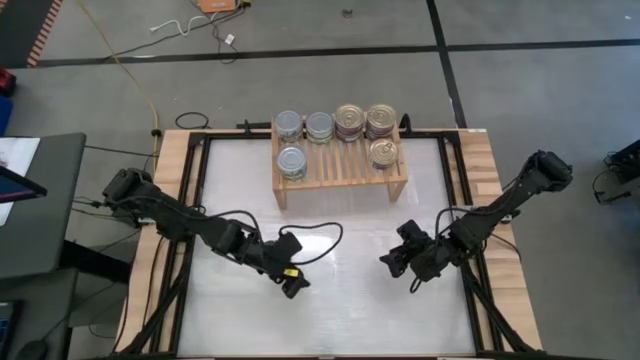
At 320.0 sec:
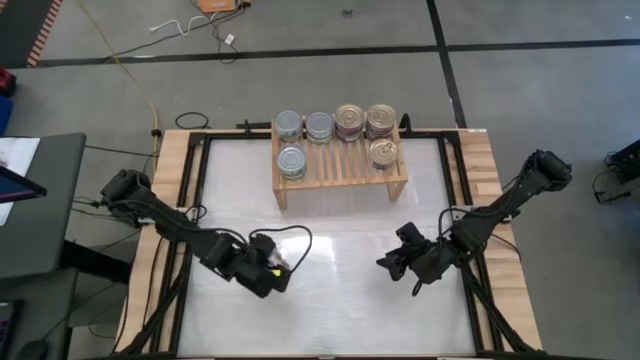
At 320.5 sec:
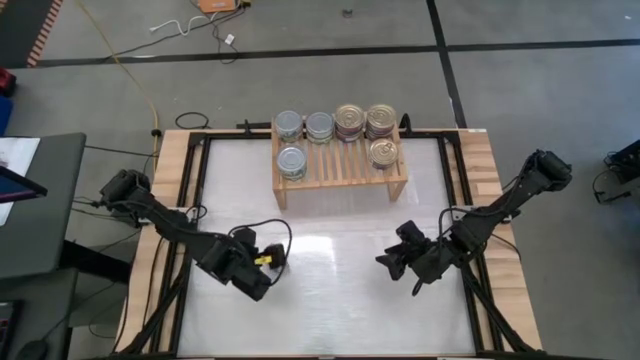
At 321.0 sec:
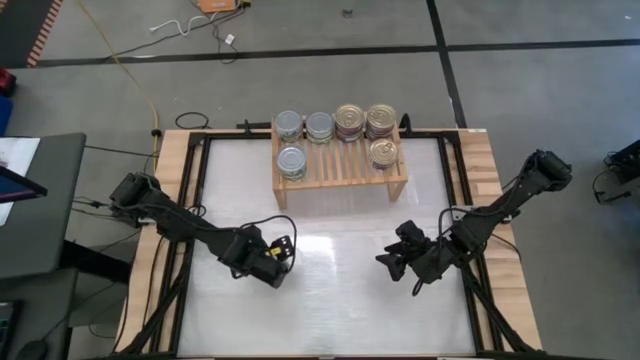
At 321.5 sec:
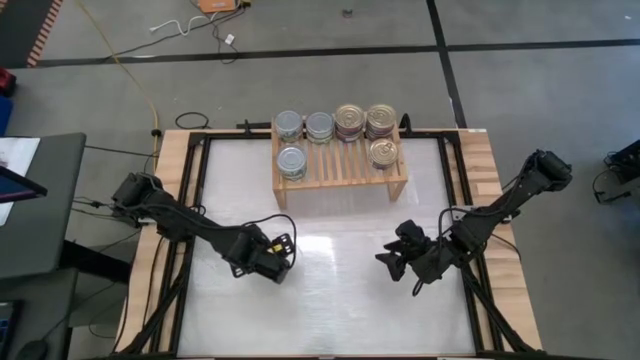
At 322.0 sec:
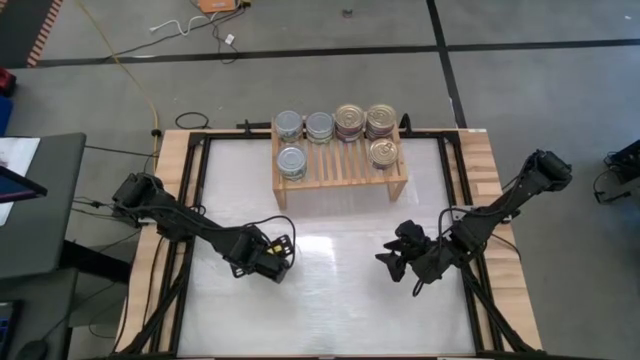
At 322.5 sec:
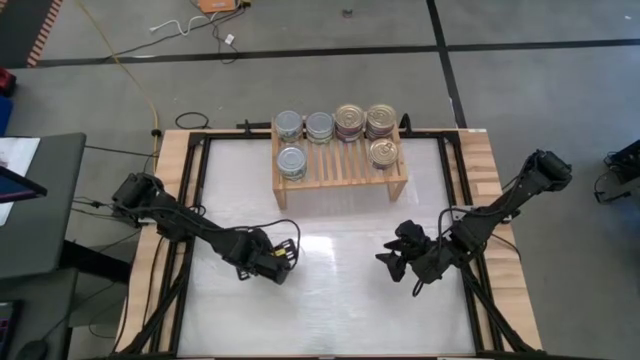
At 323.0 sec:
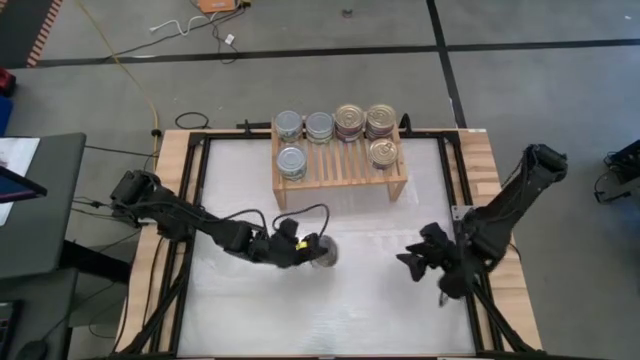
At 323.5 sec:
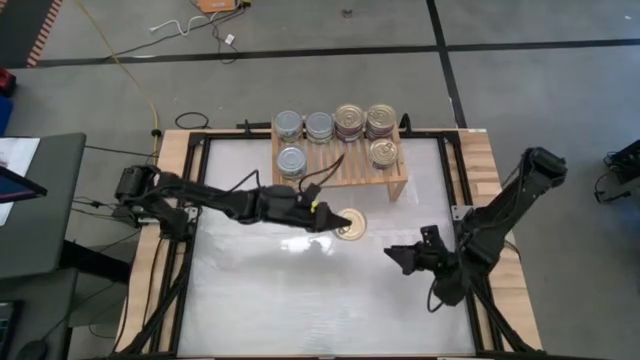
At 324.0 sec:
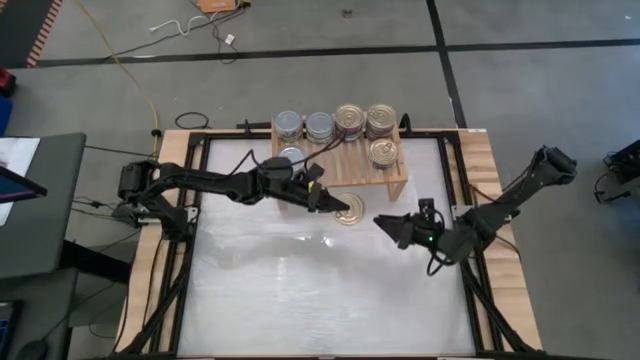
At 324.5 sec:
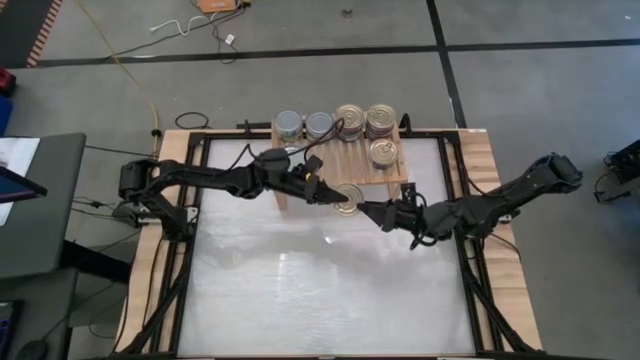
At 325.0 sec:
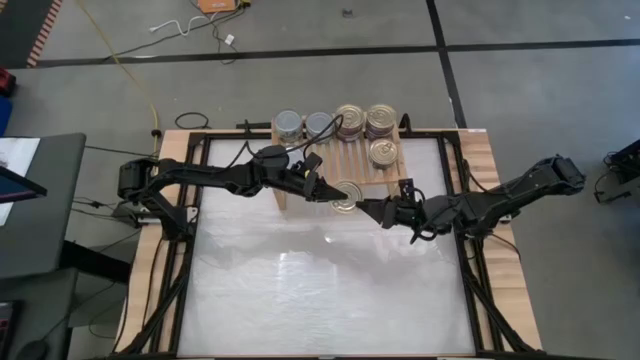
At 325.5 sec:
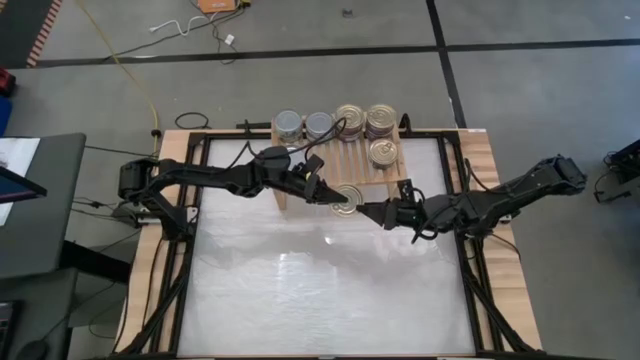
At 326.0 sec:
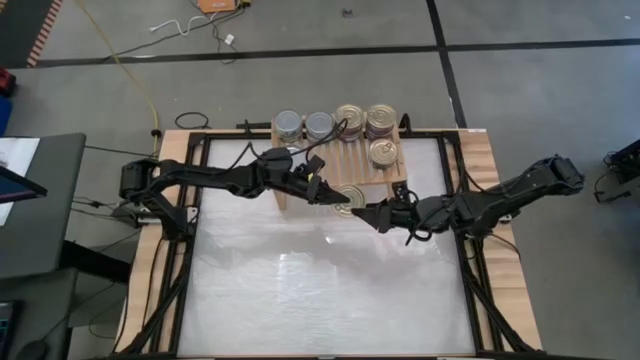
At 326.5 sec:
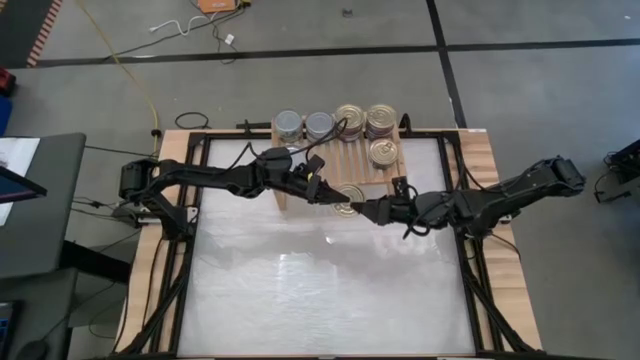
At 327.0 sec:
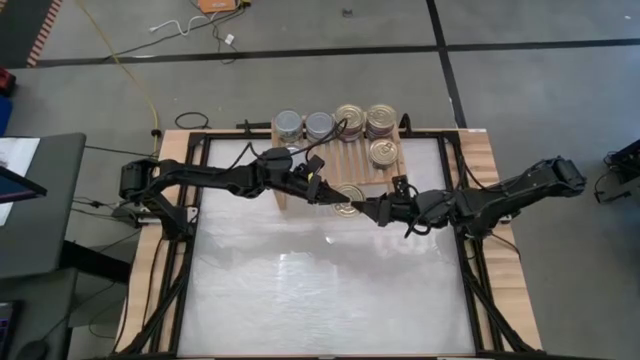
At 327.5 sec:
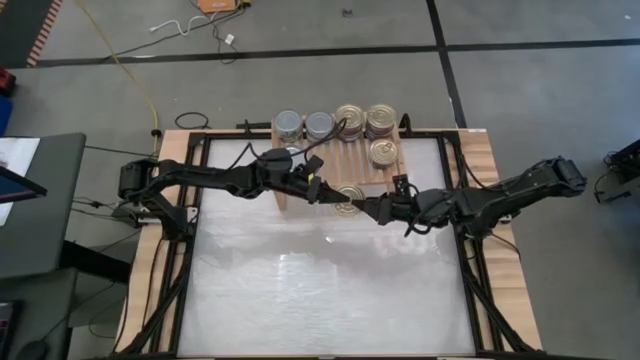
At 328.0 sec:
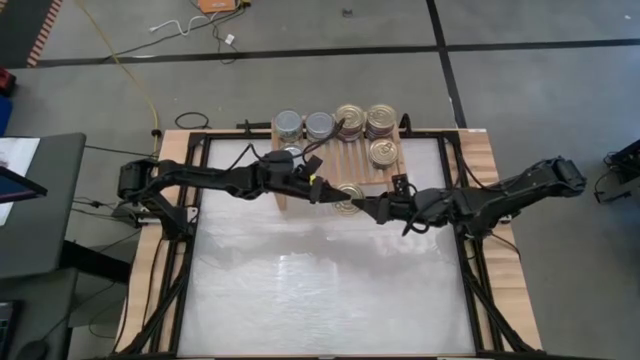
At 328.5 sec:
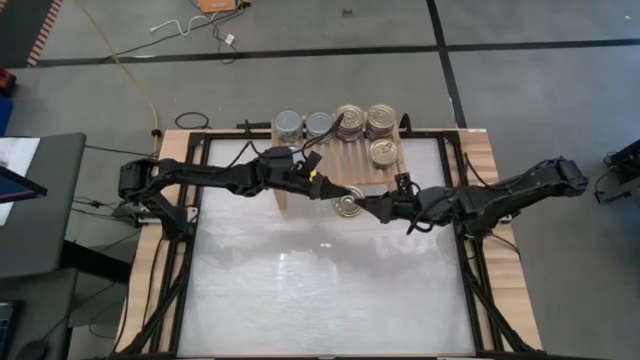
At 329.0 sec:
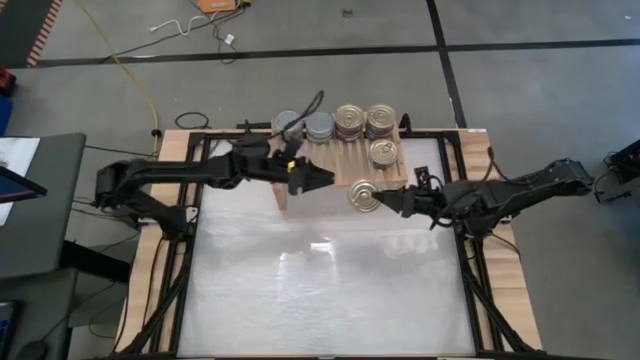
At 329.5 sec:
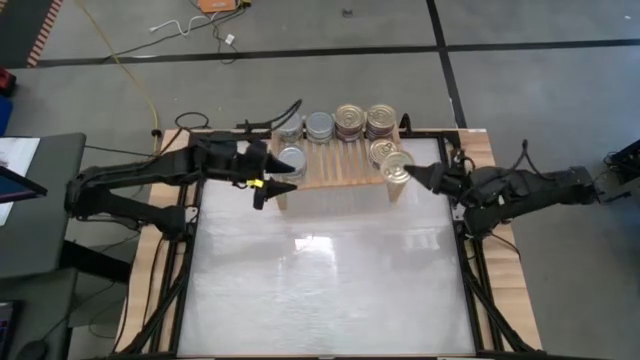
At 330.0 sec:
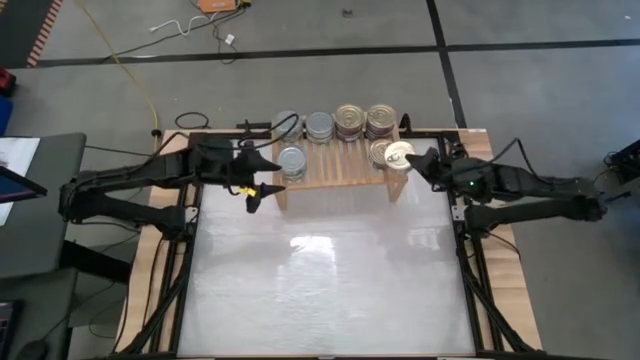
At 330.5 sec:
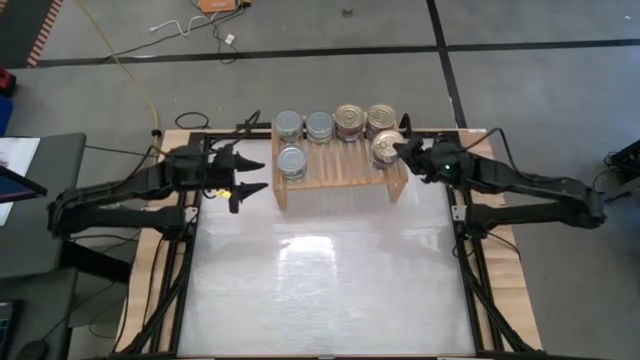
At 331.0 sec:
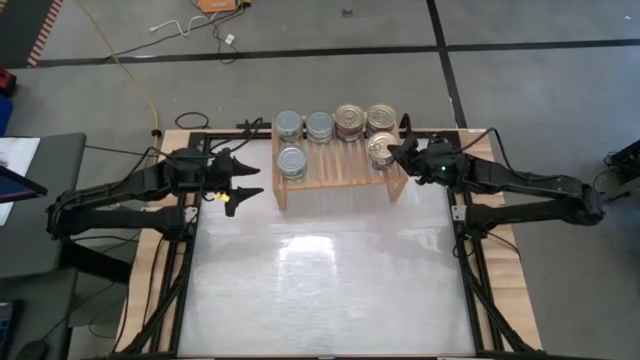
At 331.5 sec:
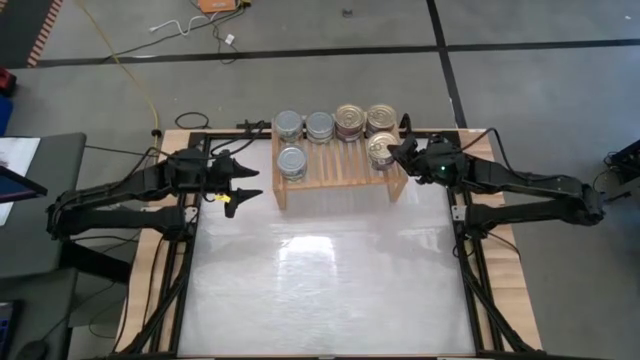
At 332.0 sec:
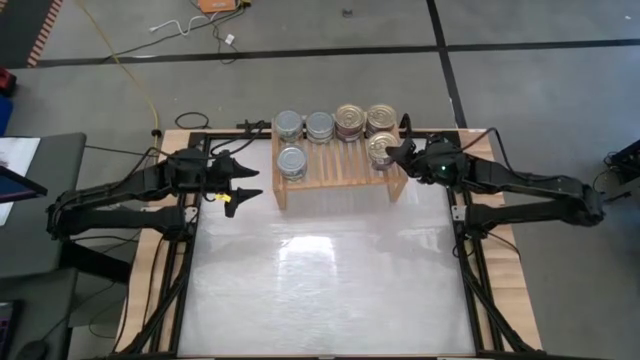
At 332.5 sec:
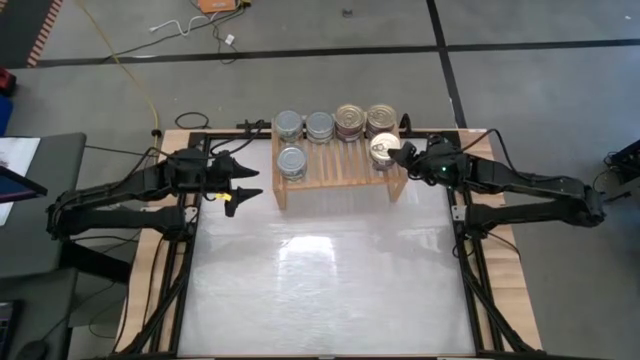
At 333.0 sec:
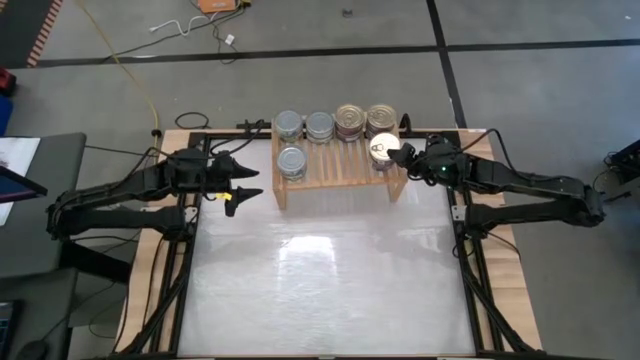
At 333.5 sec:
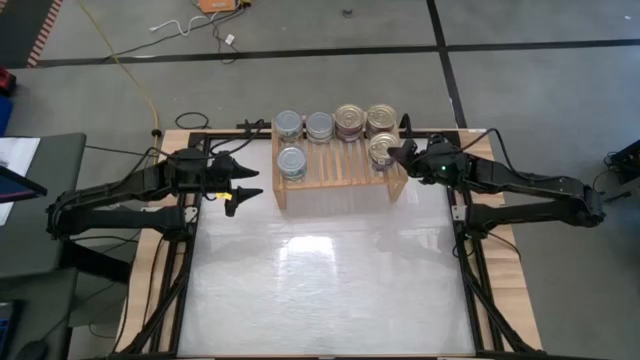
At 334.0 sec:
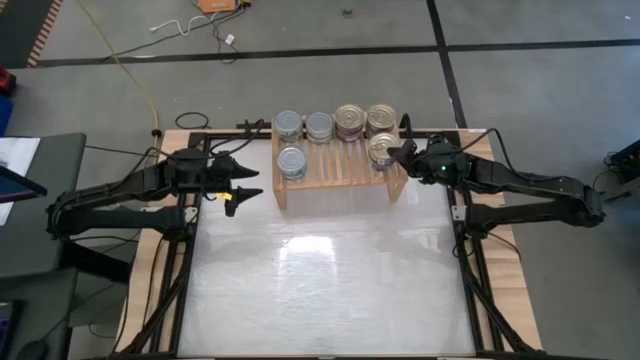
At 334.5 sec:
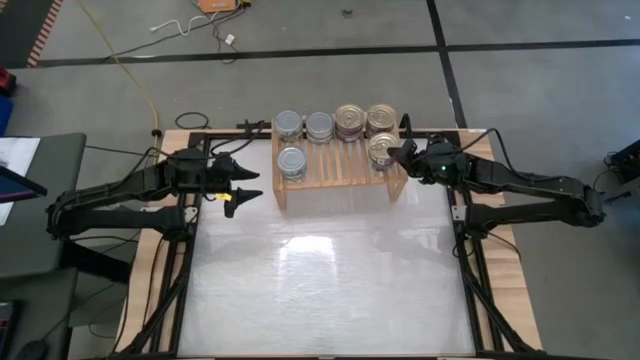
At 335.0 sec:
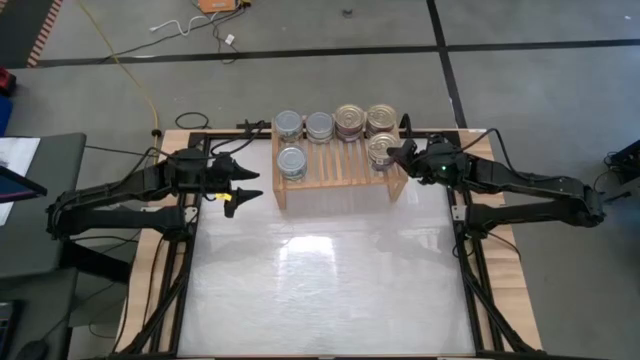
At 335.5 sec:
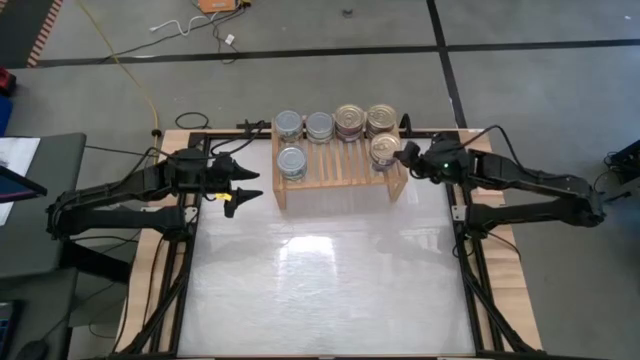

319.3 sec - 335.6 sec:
Task: Stack canned seafood by type on shelf
Stack the blue tuna can on top of the blue tuna can on the shelf

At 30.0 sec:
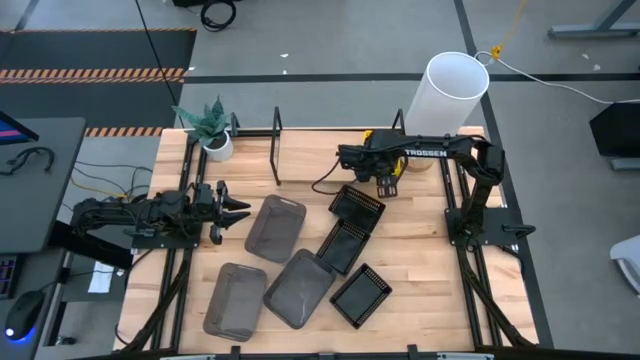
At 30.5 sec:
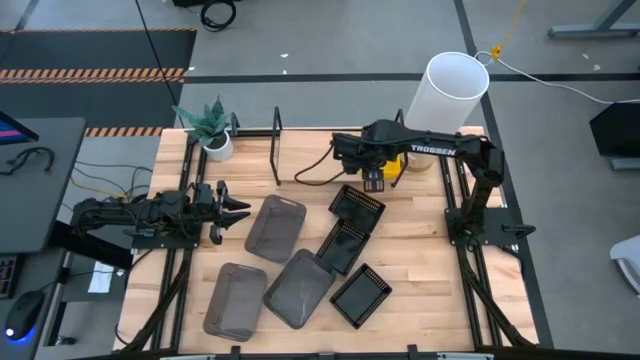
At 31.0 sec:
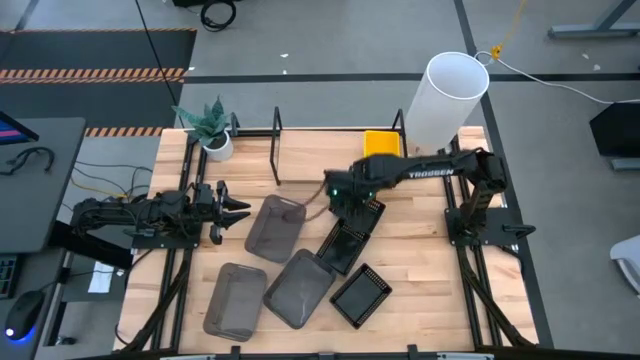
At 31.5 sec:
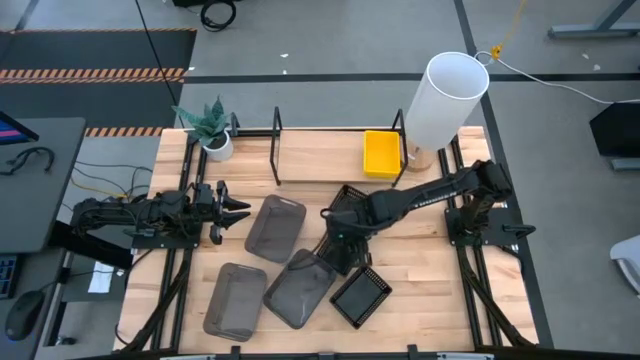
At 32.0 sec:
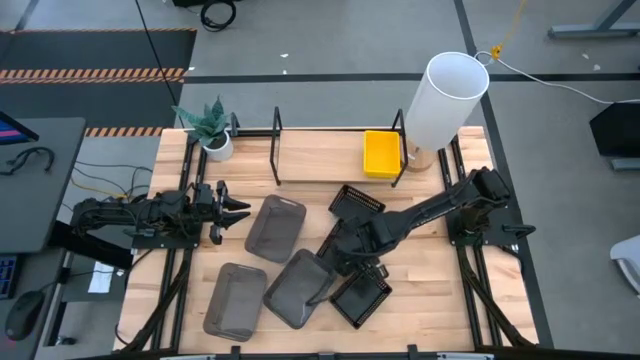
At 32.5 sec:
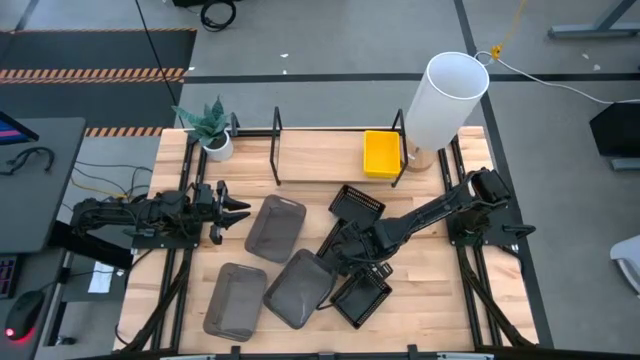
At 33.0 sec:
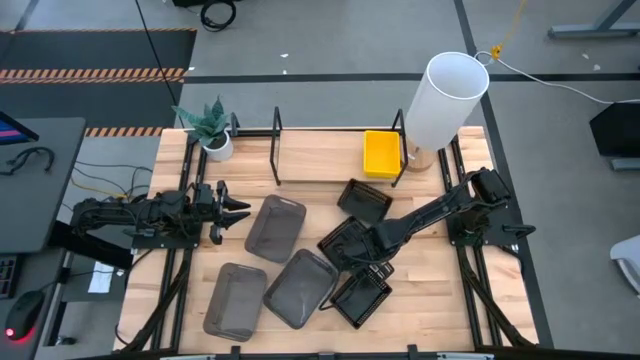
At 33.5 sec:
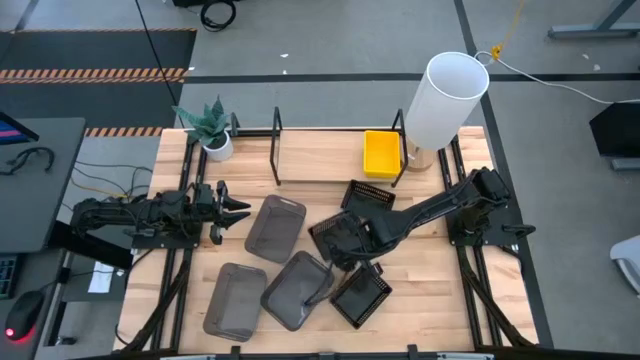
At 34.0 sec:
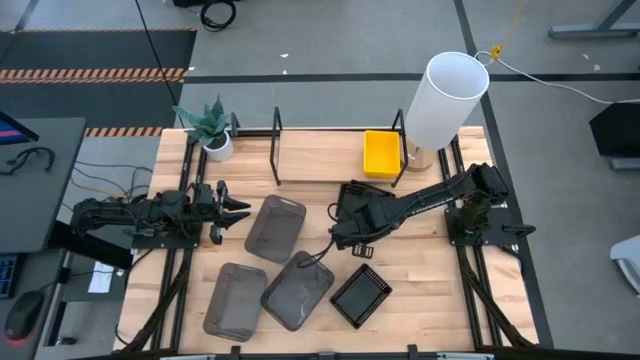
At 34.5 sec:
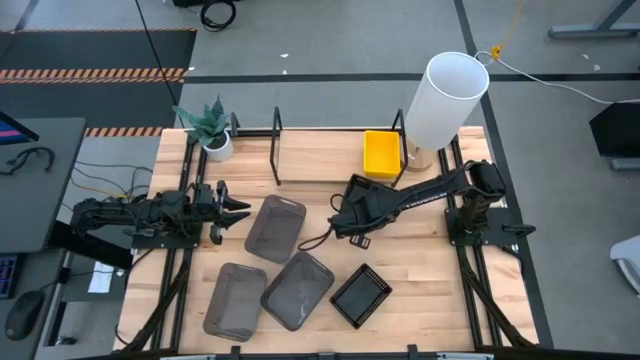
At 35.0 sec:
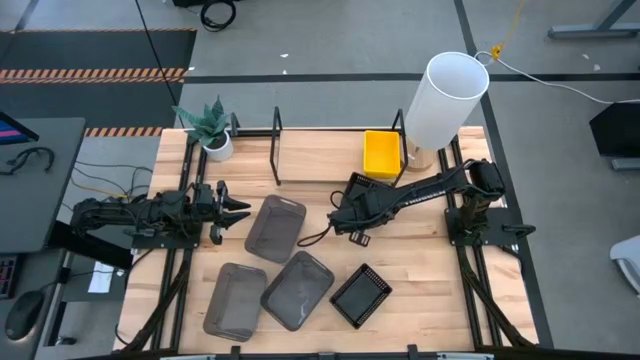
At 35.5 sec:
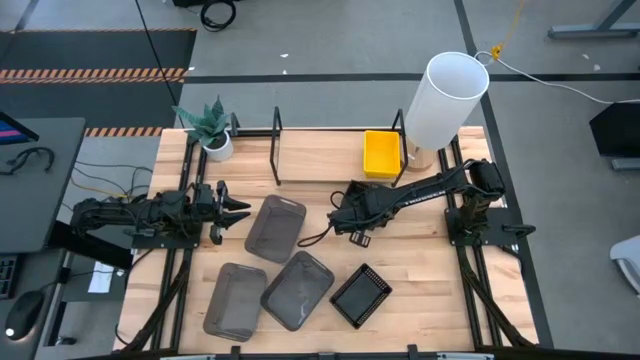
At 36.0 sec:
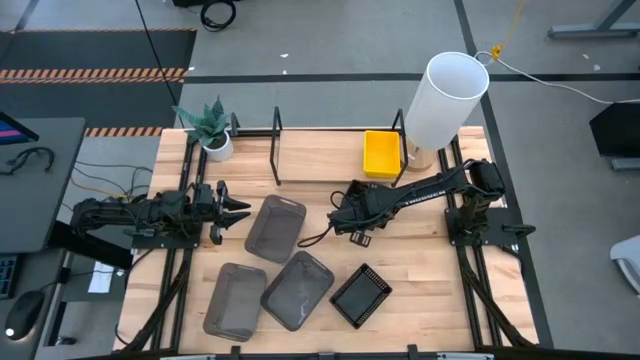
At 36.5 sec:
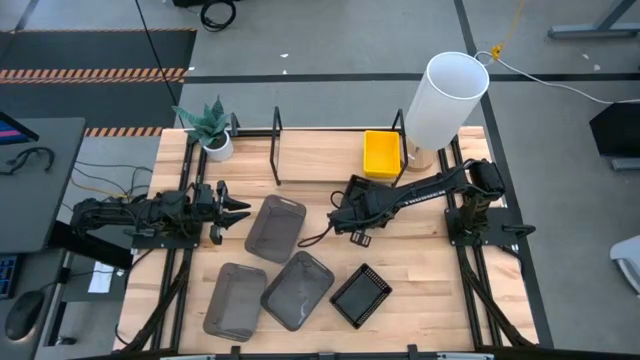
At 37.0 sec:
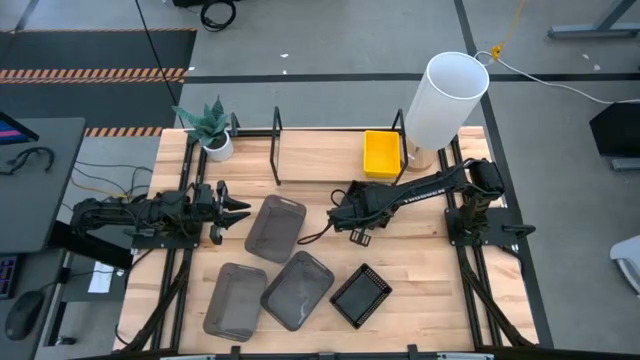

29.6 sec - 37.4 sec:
Task: Stack baskets on shelf by color
Stack the middle black bin on top of the top black bin
